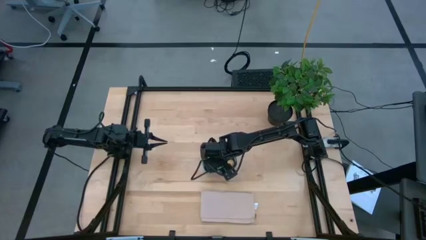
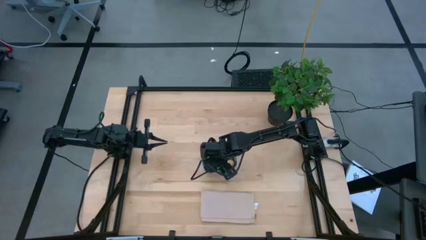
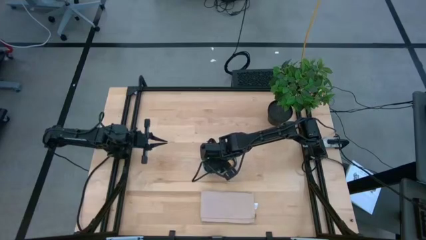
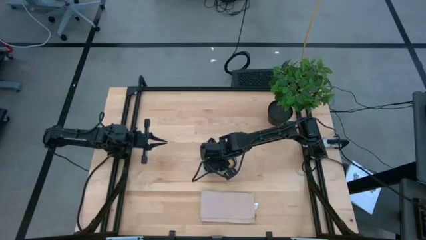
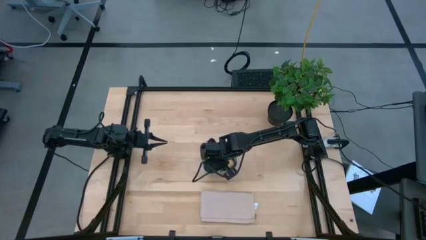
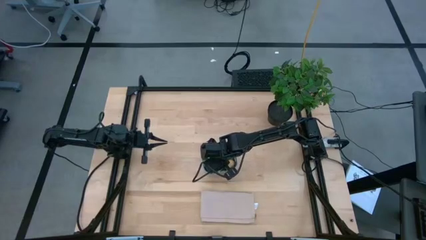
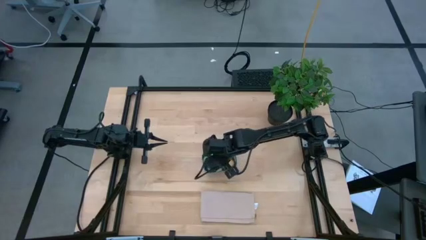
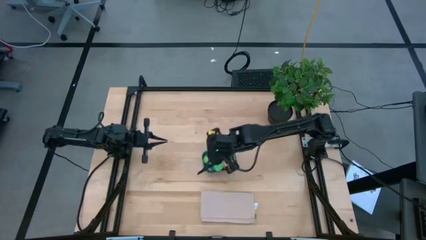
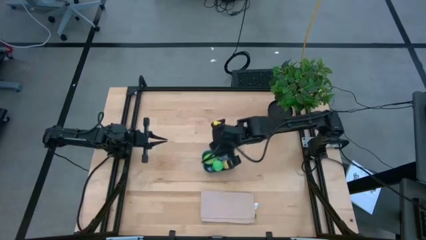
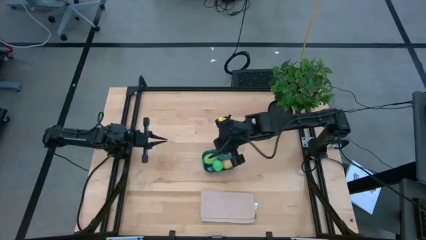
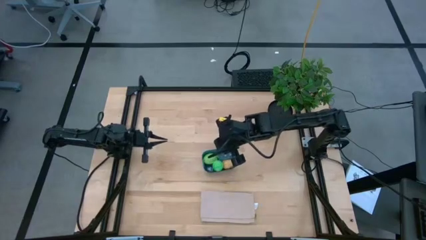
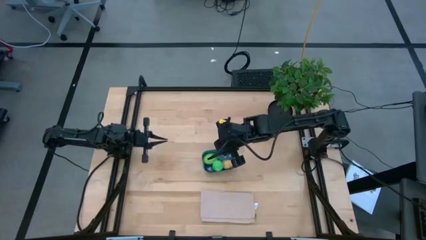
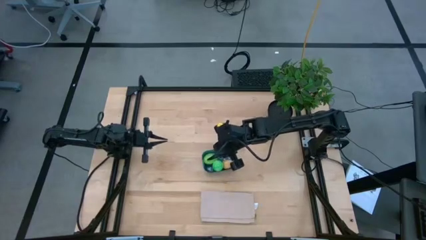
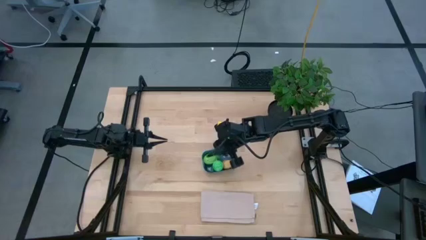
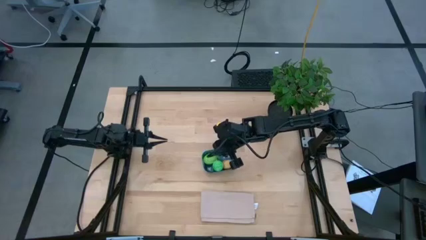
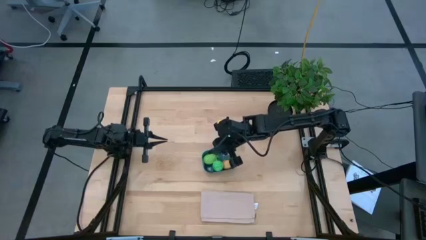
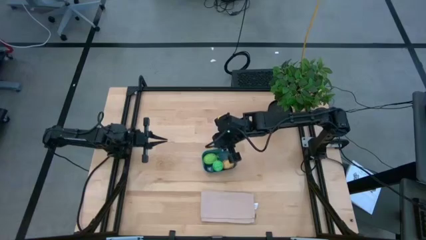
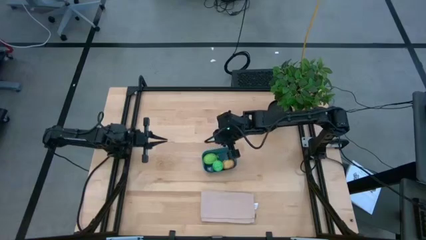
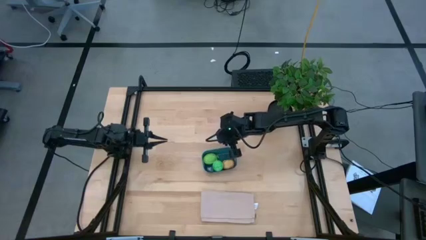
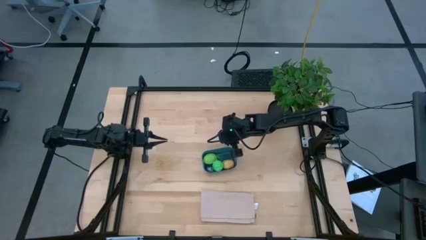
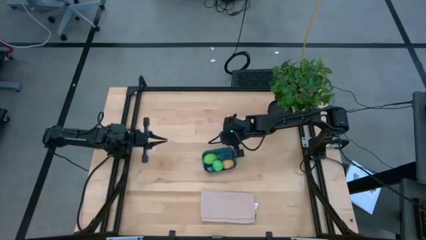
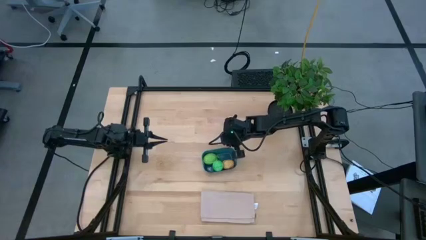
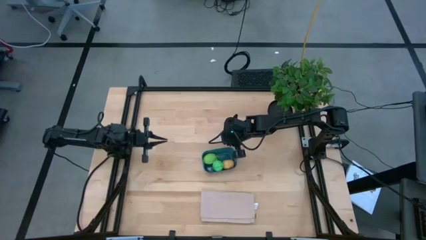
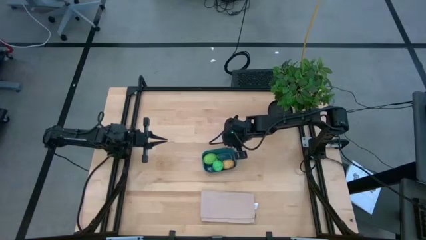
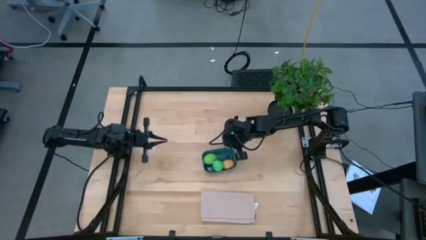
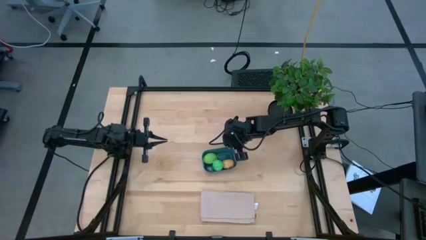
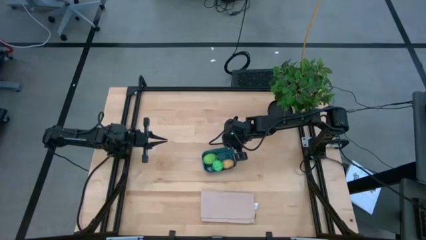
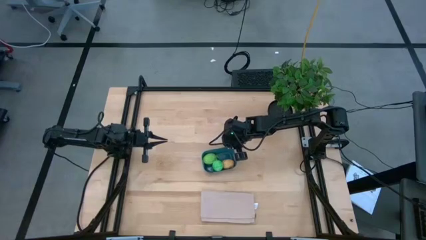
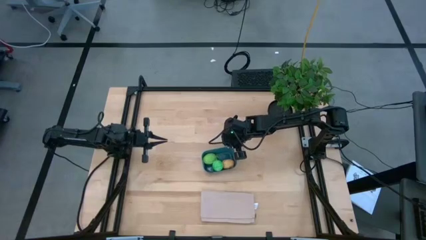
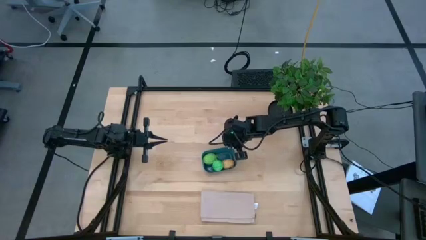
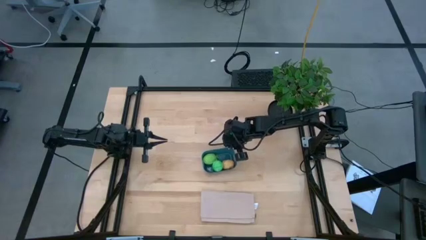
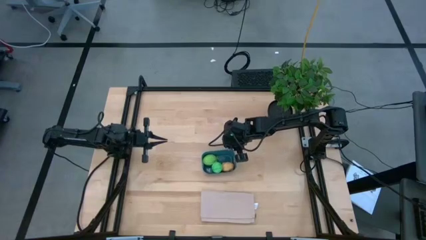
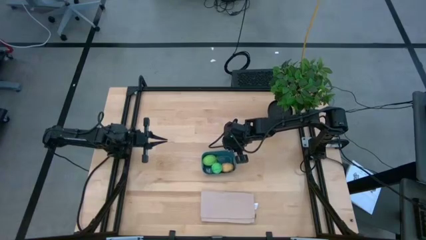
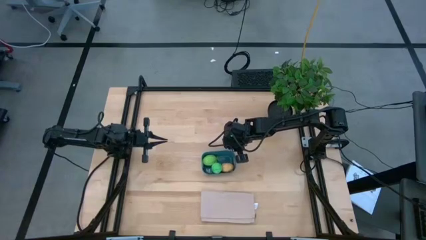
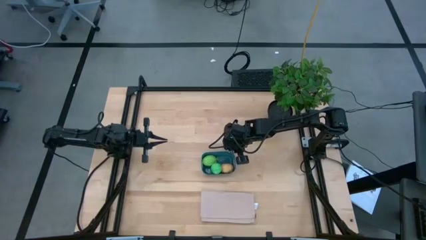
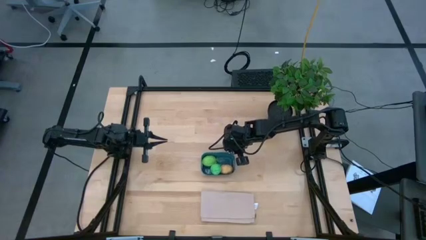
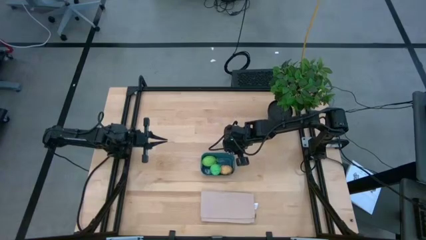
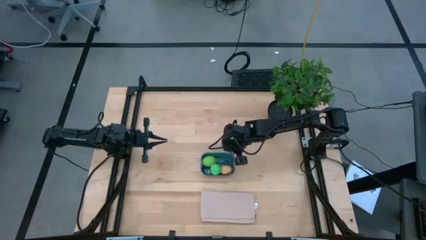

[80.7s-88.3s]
Task: Pick and placing Produce into tupperware
Adjust the dark blue bin

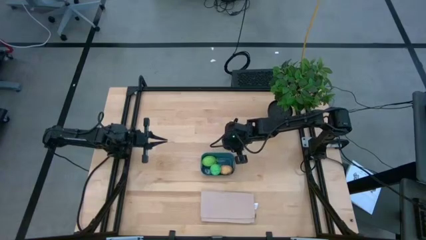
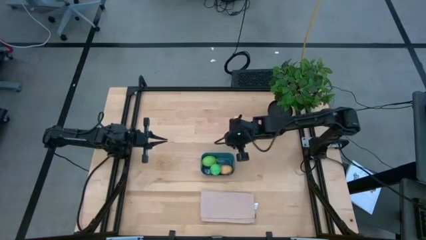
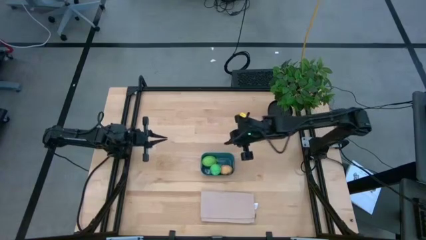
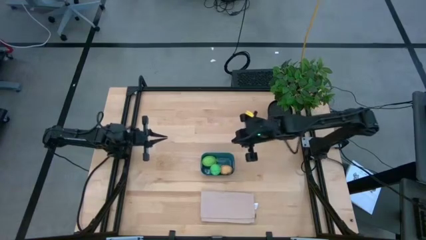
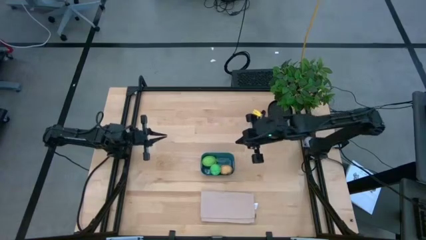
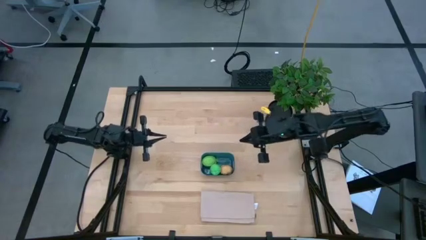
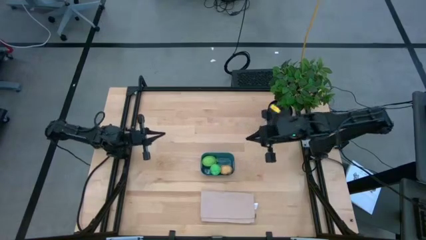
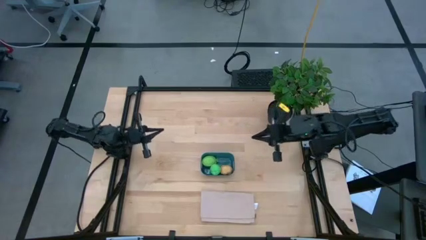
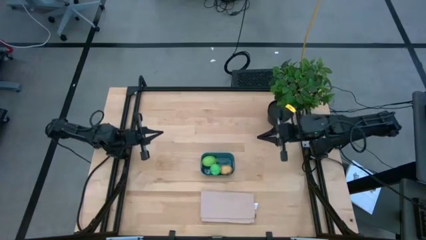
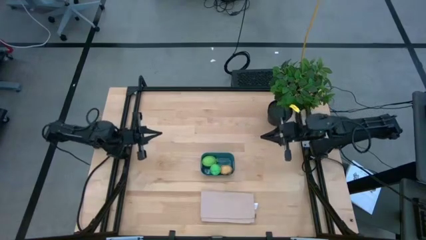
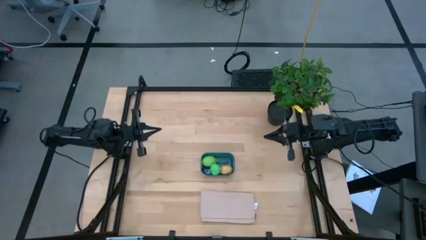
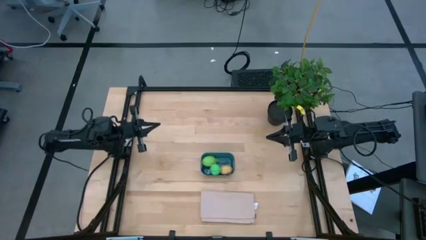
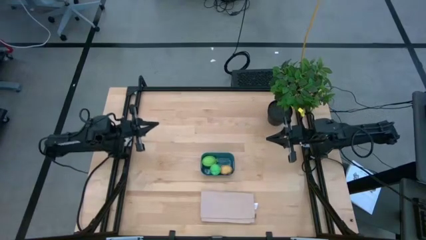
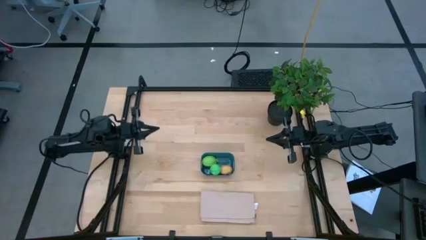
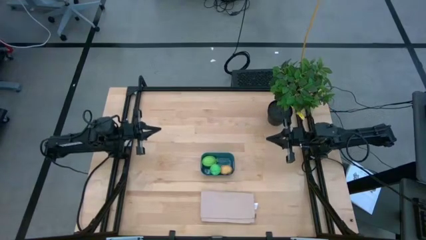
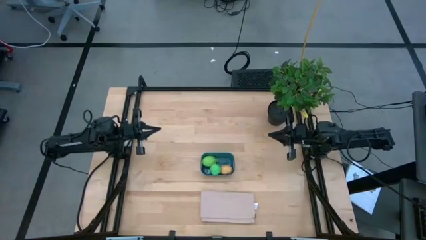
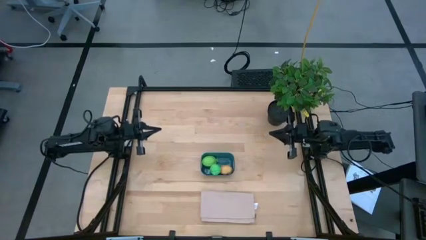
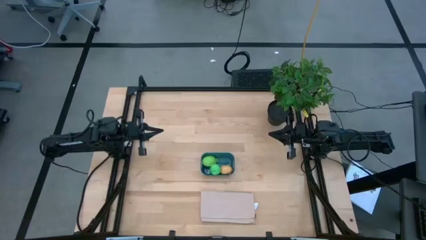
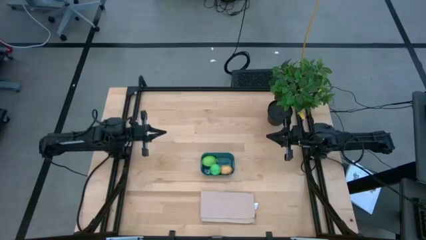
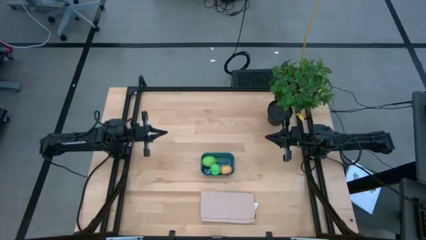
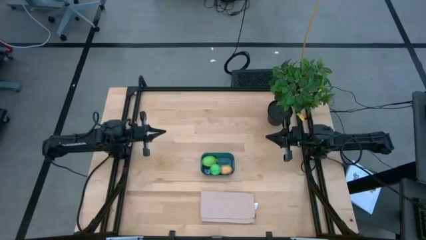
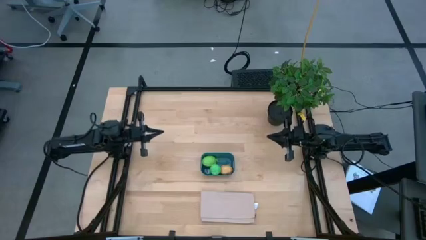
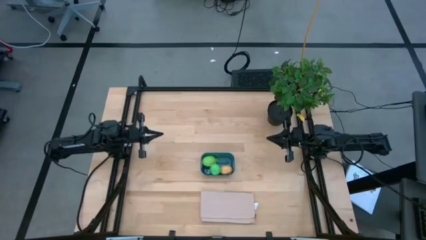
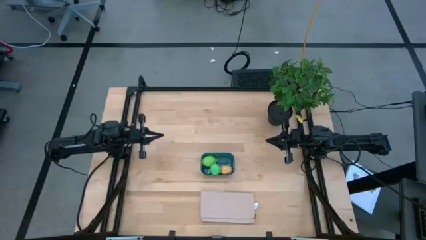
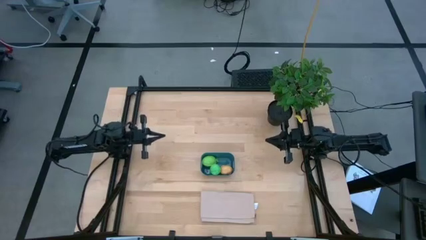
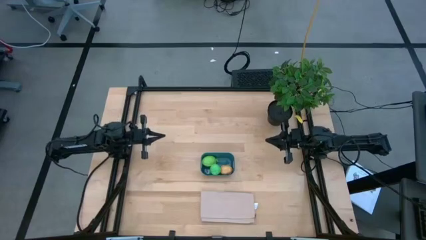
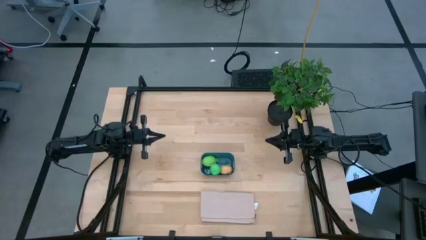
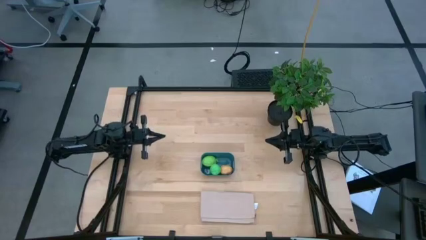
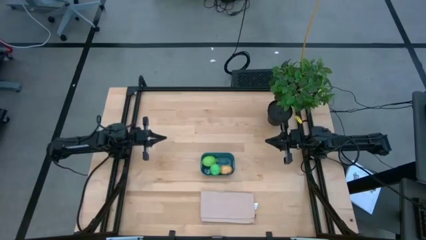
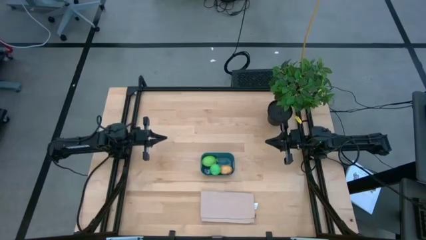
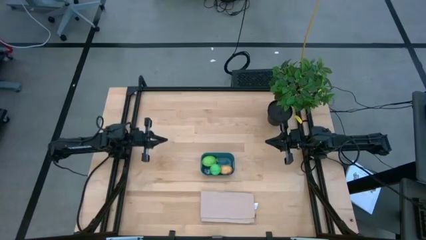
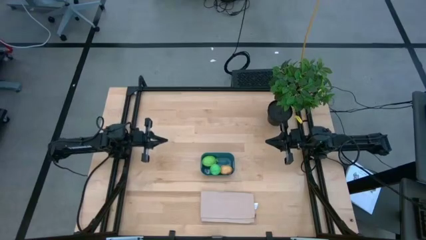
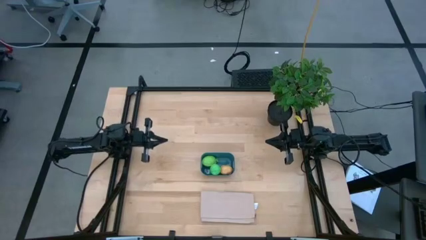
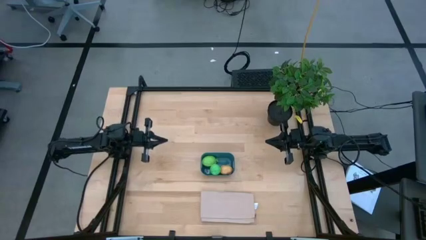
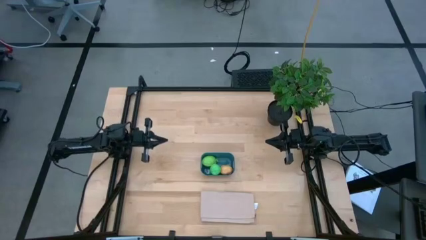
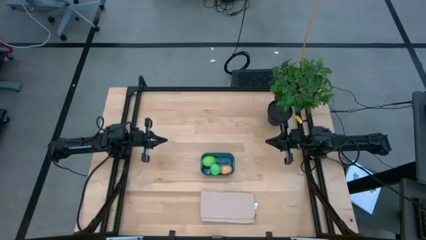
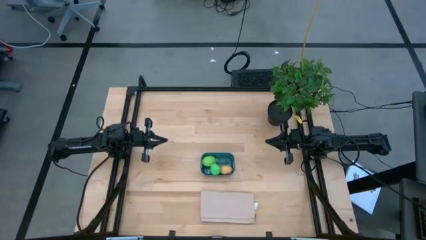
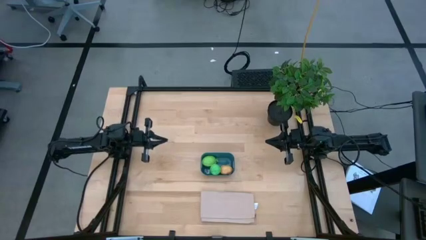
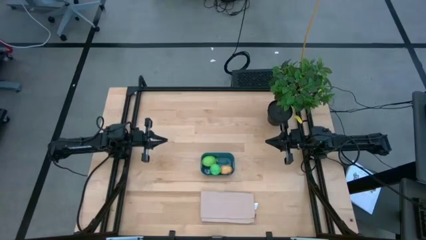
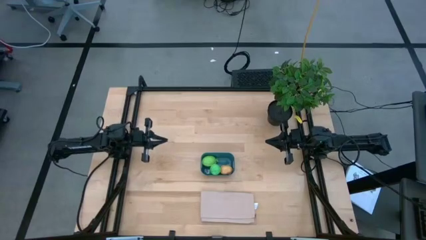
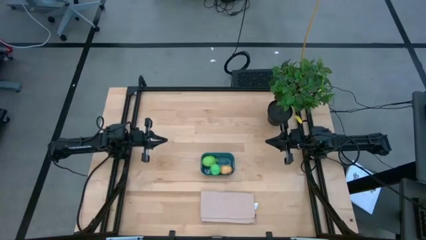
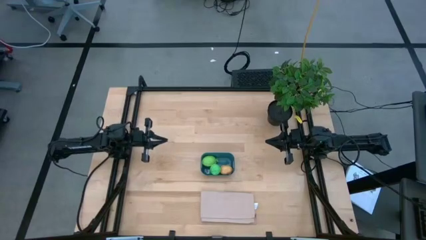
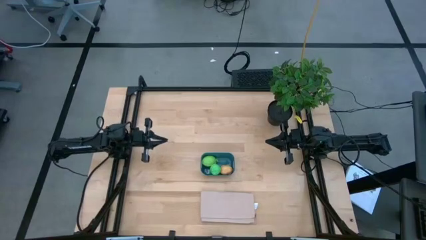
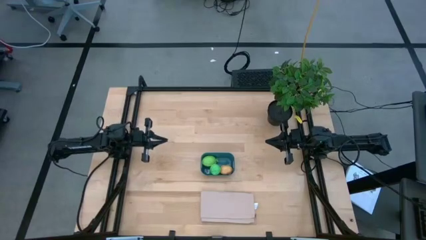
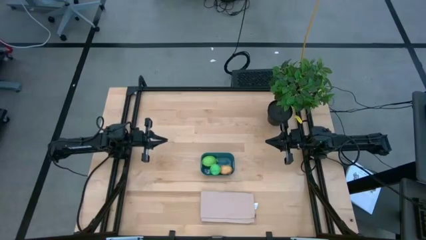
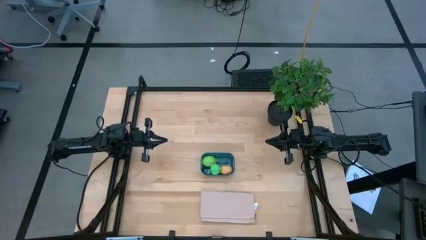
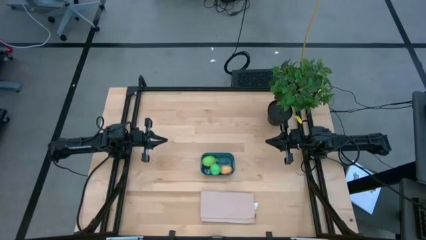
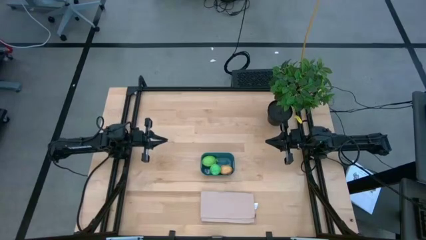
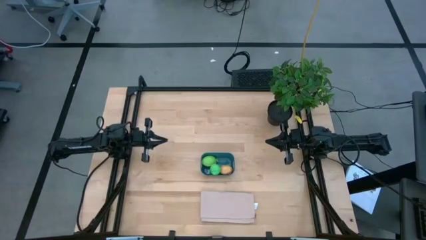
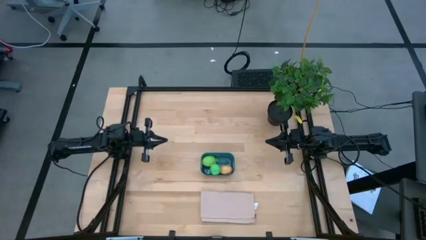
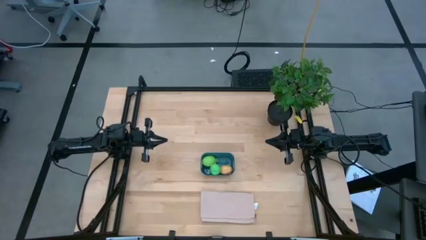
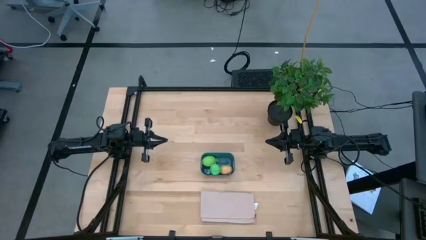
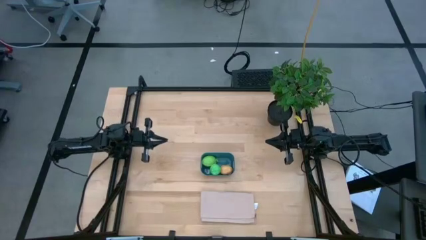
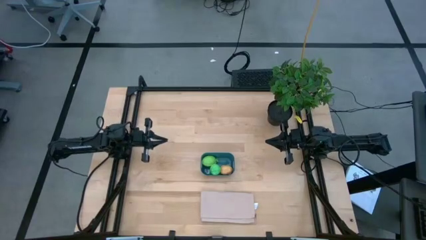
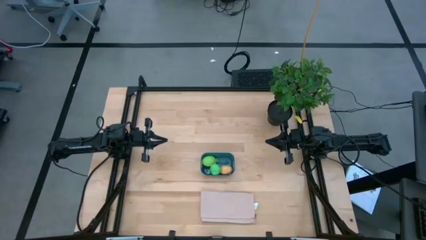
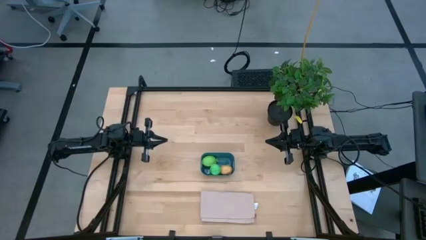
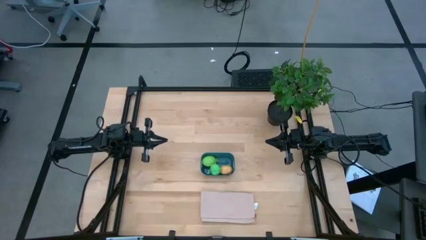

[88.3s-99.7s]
Return to Home Position
